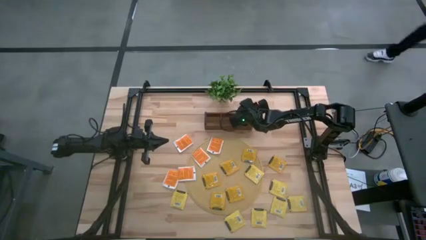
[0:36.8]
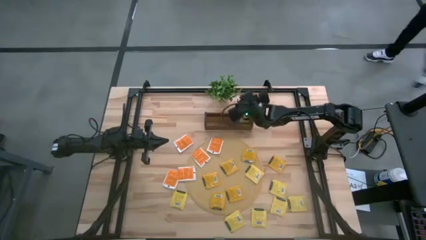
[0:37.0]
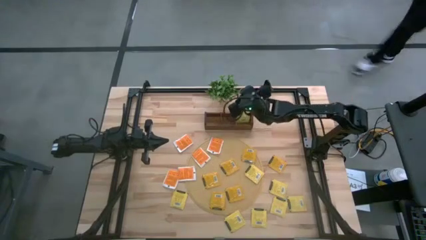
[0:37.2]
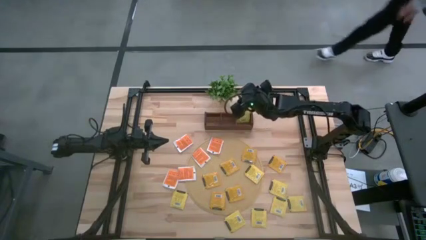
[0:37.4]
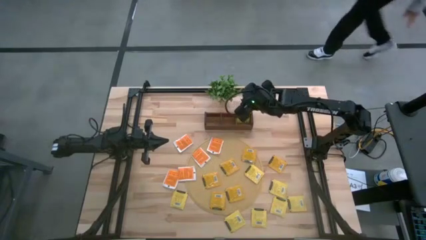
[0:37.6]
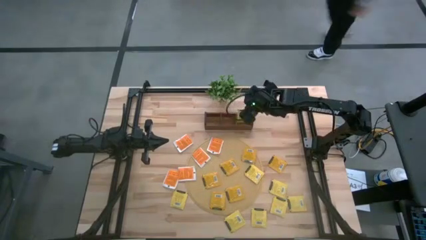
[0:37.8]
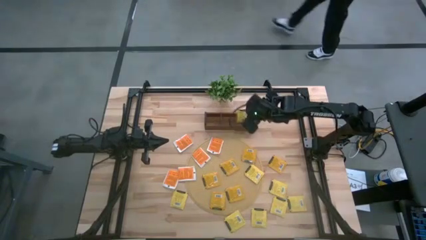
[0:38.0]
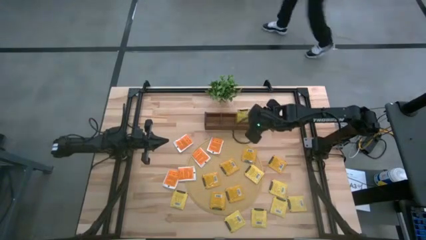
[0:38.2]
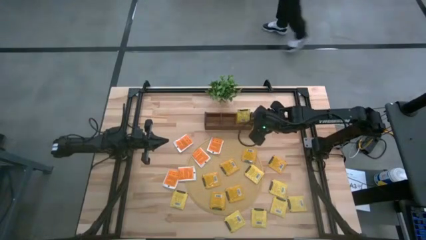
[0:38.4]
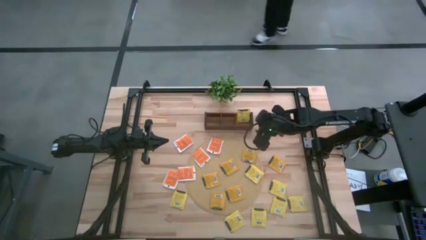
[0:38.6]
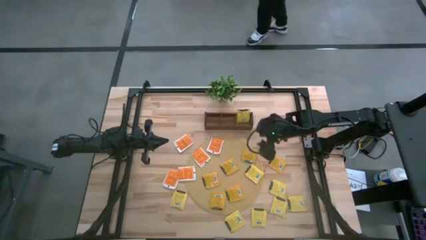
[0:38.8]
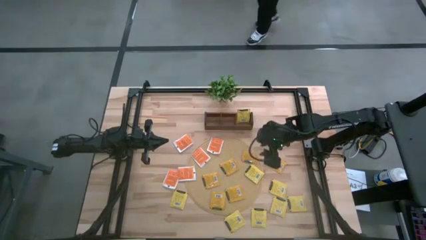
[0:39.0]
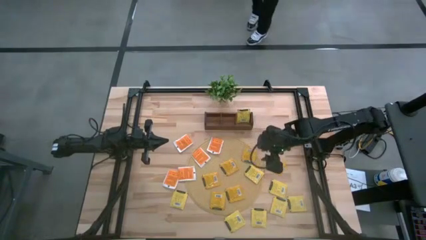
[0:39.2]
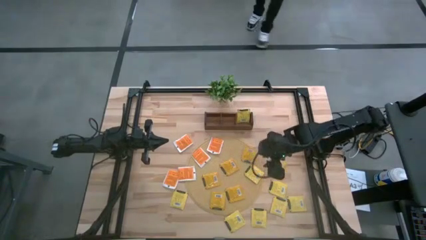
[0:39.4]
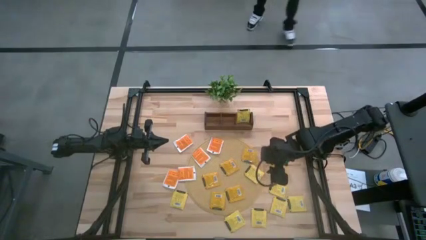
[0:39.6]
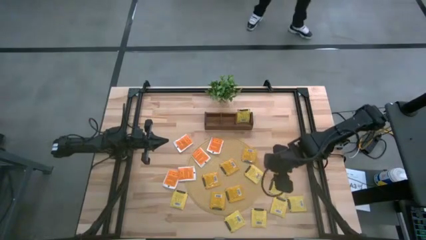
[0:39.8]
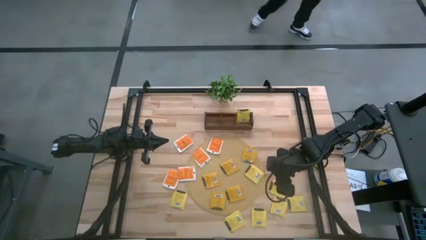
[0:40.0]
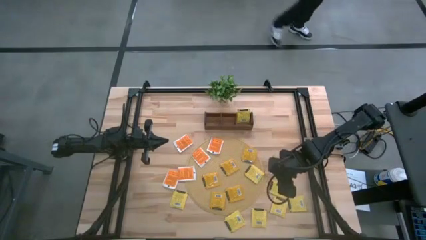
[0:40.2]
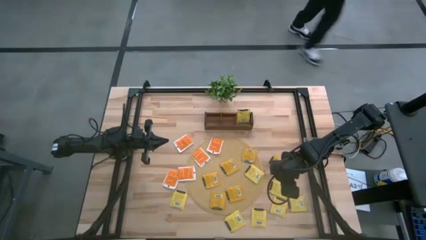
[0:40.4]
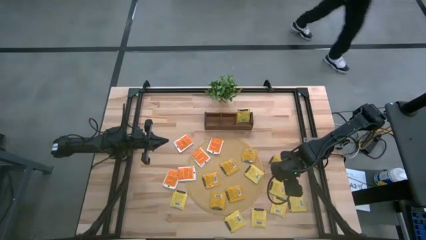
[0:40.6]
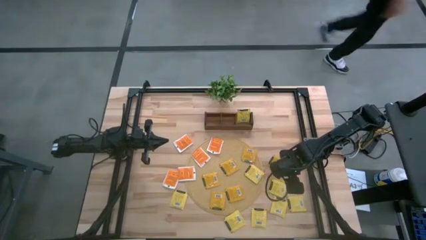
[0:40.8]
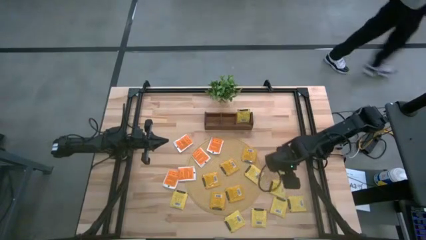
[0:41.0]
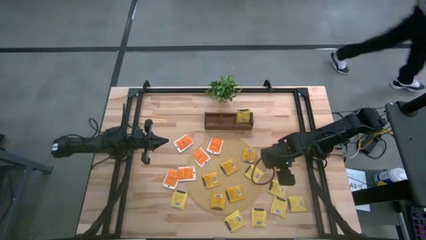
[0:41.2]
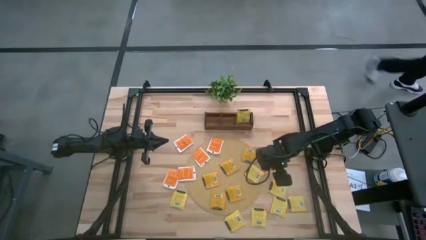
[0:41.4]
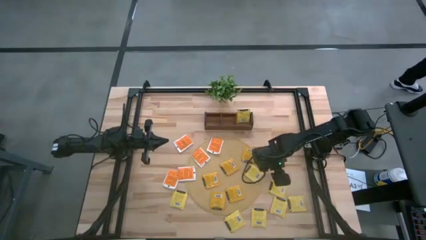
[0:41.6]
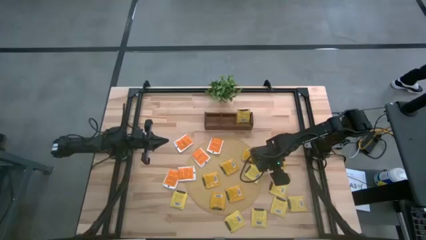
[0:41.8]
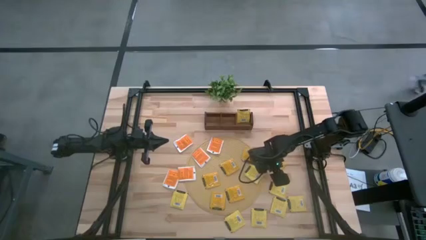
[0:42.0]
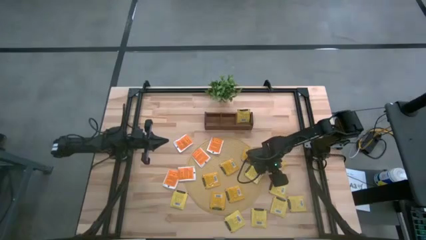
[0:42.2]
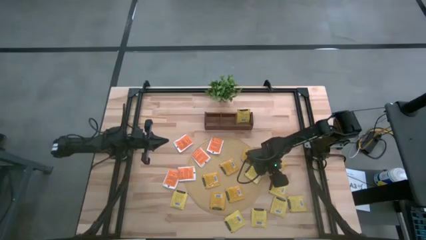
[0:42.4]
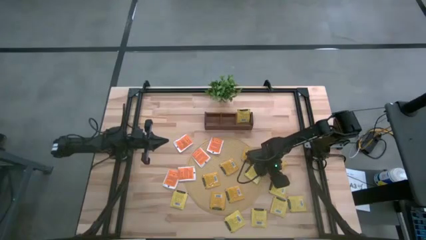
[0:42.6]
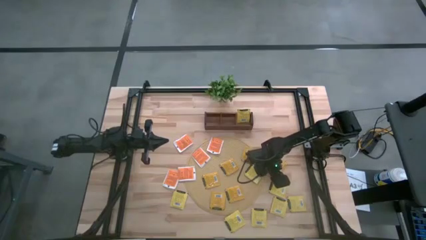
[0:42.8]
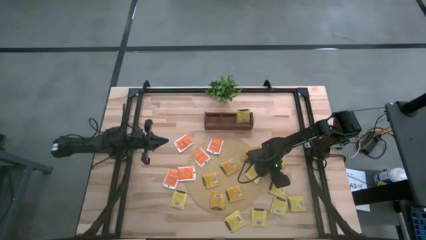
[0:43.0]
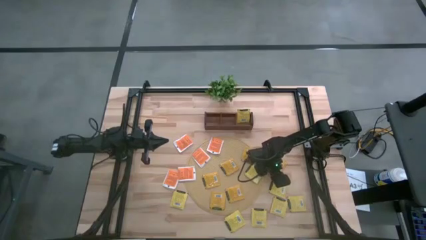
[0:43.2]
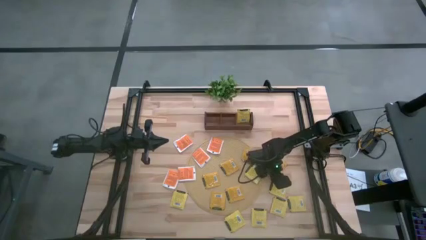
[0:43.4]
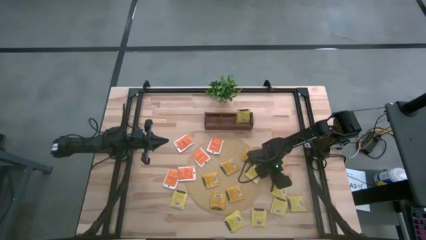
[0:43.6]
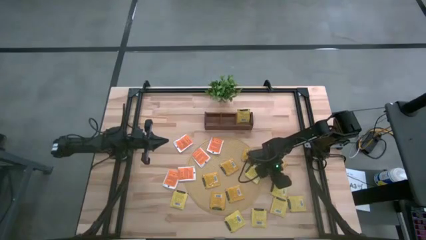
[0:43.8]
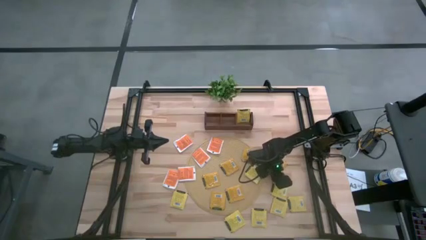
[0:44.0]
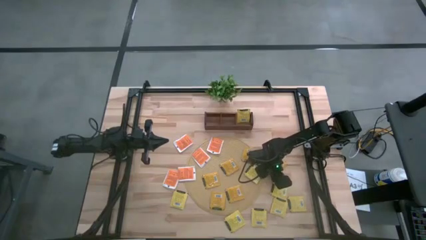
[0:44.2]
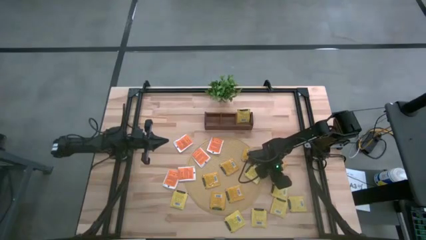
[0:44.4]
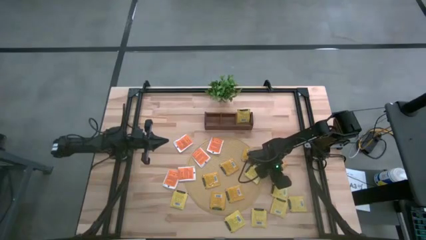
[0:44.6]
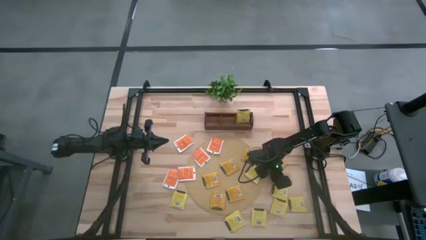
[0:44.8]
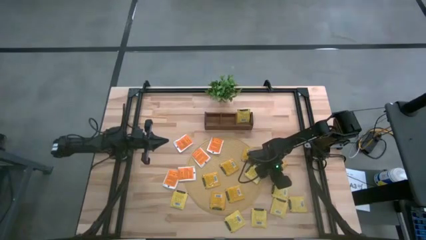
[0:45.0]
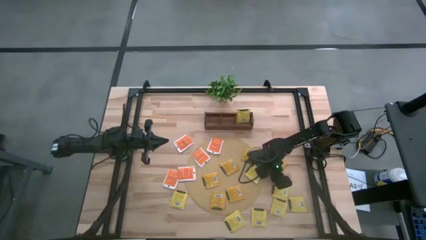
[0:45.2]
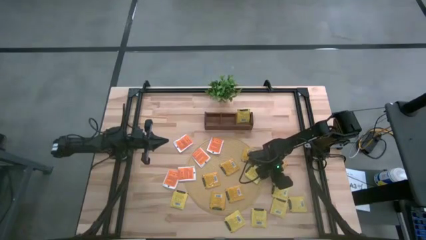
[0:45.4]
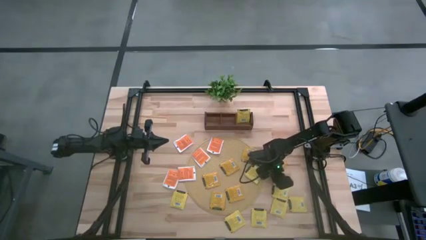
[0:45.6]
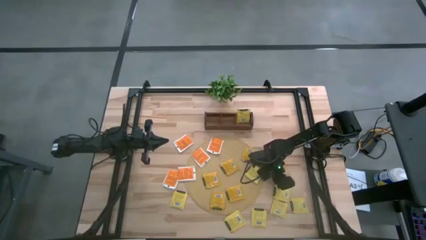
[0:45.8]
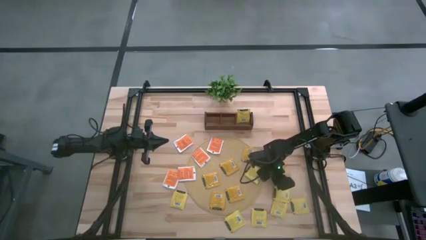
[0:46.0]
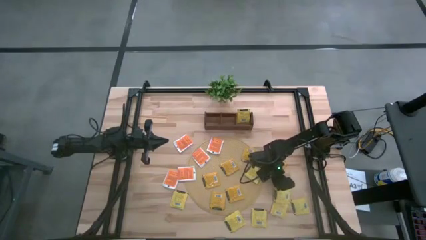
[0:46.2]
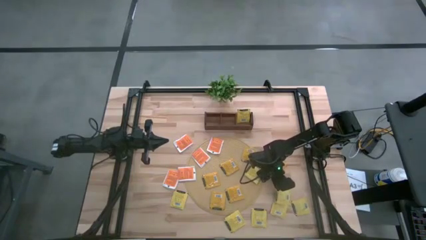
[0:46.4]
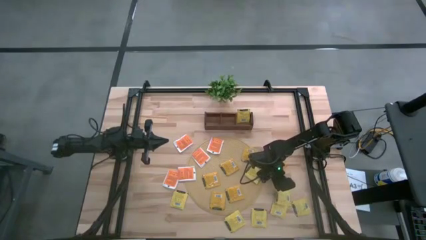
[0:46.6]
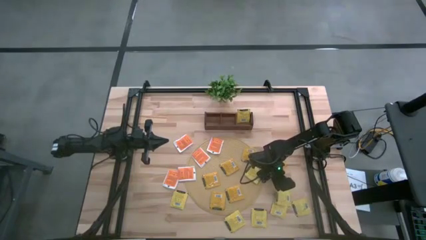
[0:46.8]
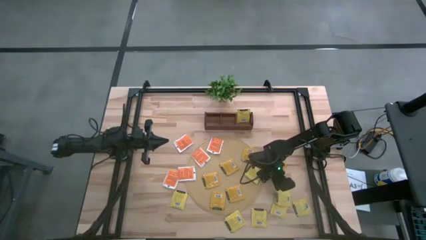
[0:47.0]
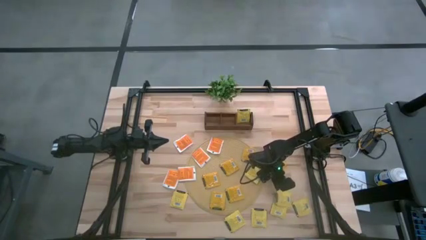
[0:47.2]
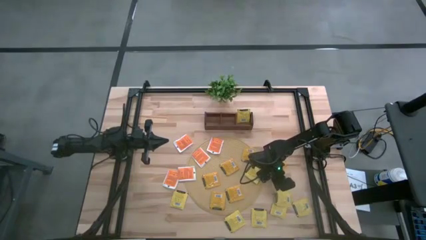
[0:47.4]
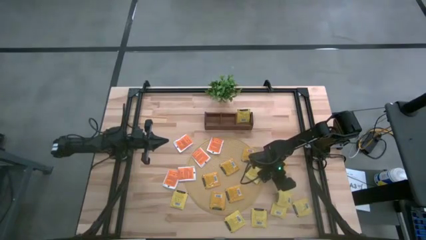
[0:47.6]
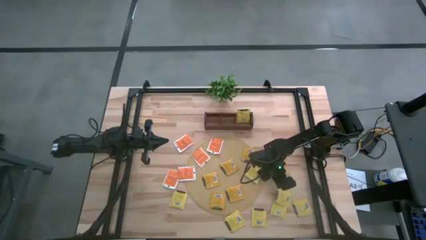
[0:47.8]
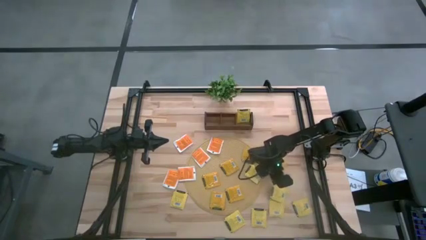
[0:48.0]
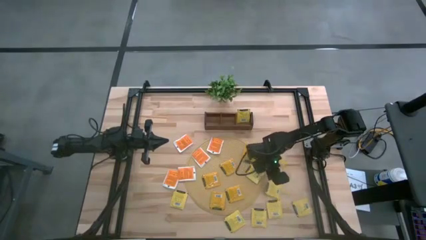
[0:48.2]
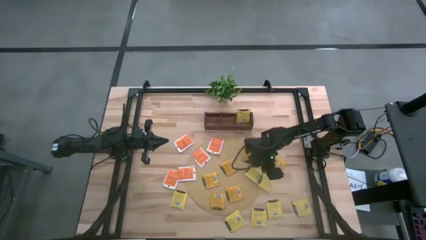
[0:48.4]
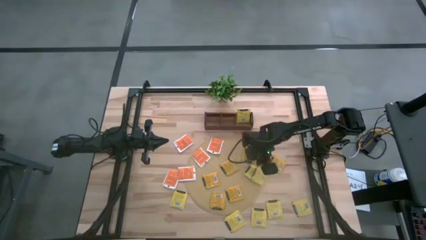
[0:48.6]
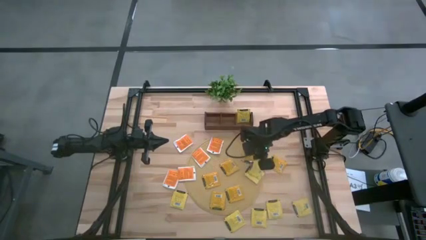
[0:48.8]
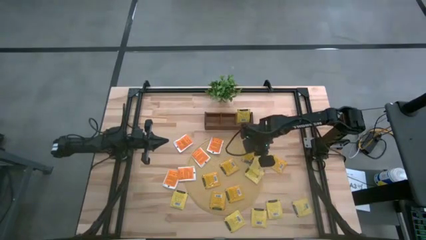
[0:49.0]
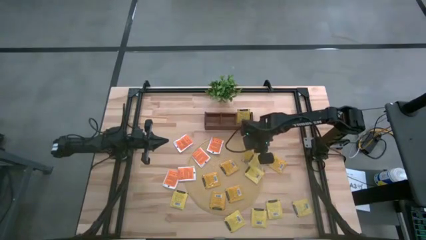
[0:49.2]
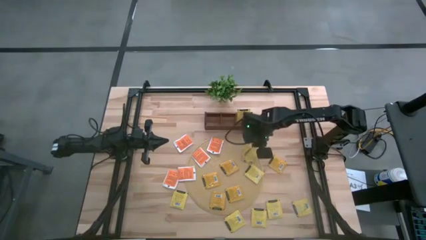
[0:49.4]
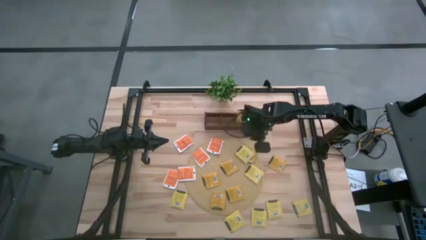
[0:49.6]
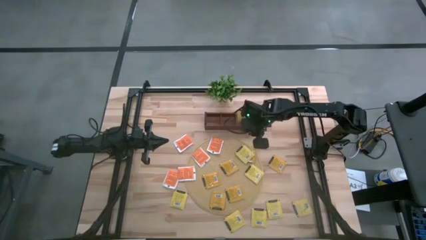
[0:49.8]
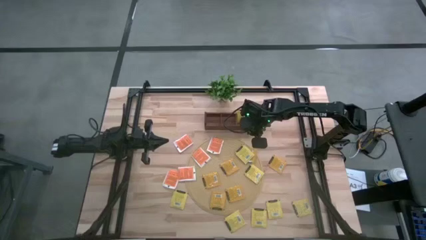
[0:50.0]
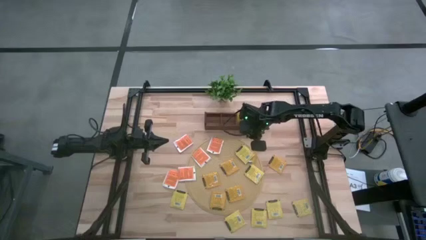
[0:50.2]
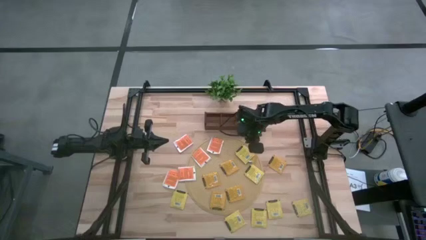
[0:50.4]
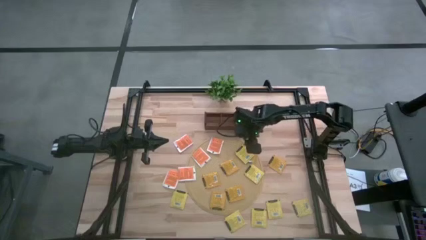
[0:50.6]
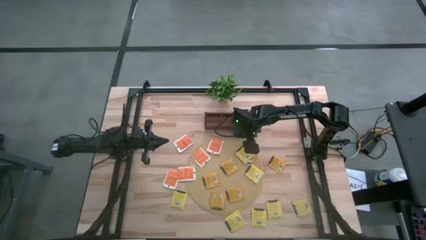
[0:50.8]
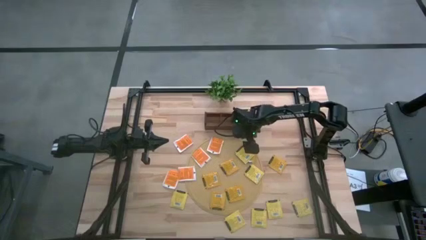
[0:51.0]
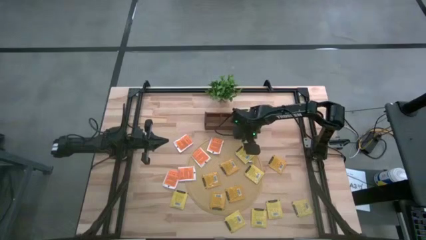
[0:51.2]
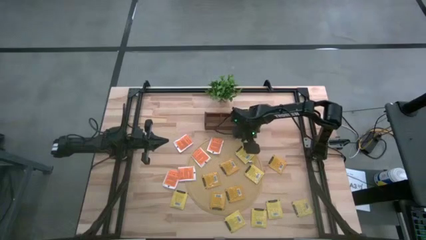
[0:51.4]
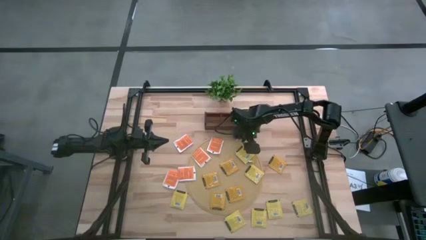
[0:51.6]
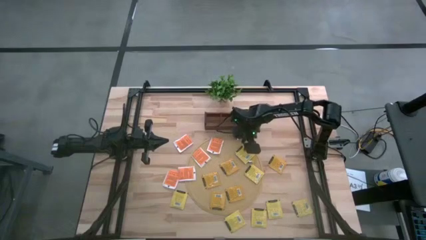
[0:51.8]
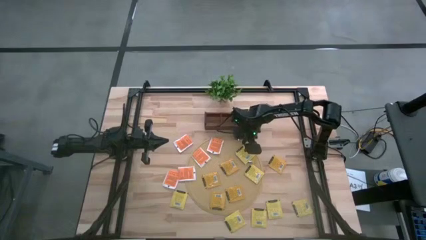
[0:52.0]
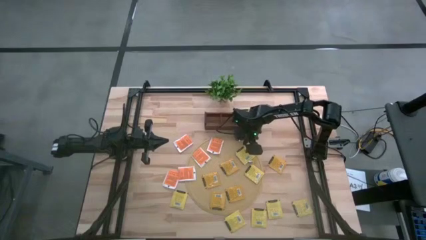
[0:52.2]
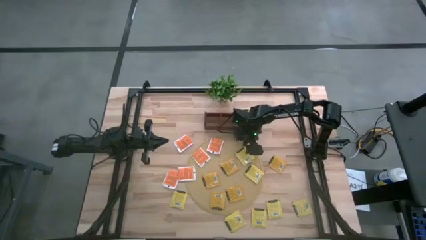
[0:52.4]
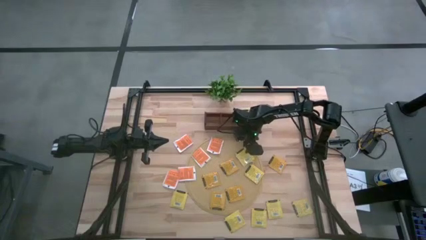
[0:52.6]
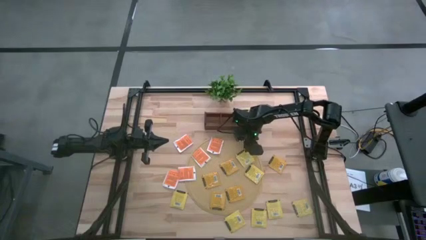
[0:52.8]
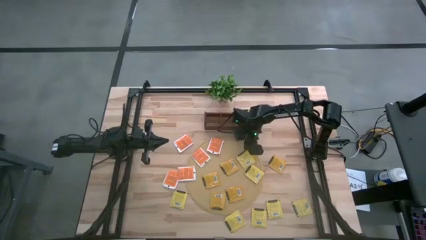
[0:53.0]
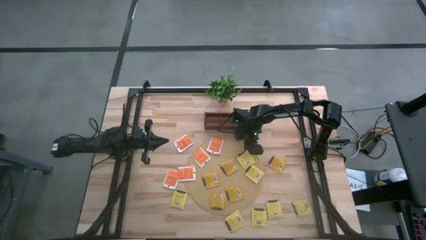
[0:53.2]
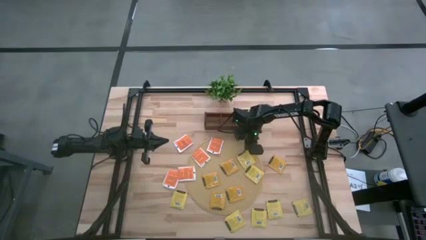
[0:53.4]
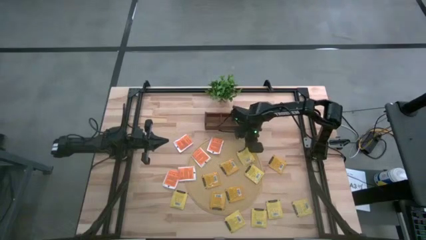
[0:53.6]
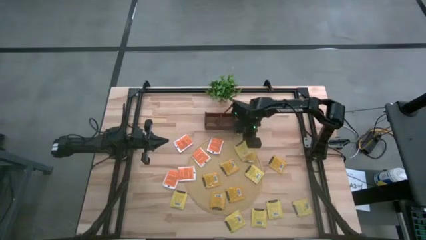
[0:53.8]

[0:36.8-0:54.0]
Task: Pick & Place Tea
Put the yellow tea bag into the right section of the wooden organizer
